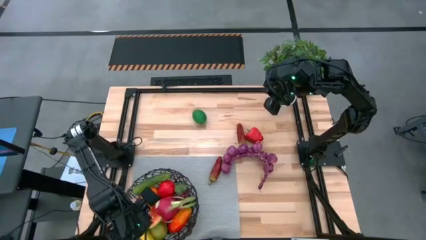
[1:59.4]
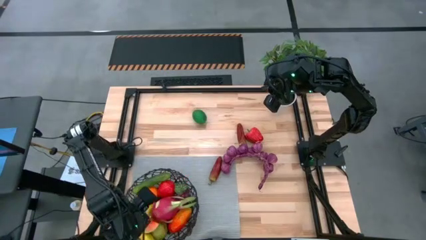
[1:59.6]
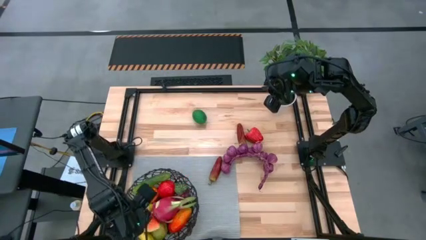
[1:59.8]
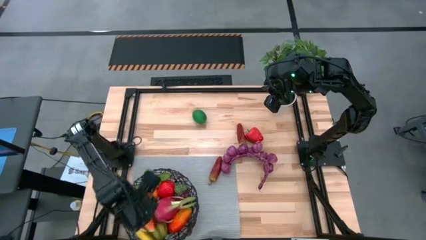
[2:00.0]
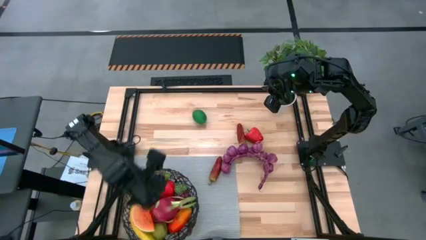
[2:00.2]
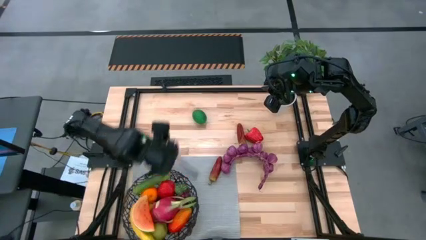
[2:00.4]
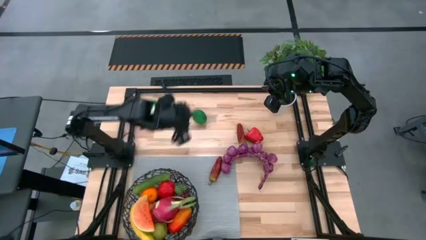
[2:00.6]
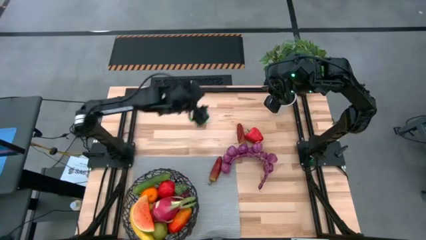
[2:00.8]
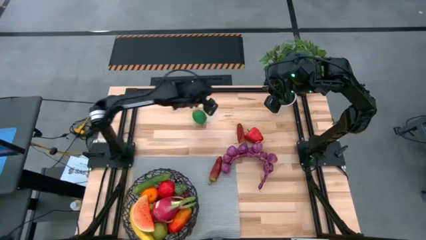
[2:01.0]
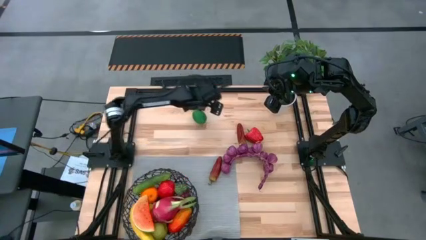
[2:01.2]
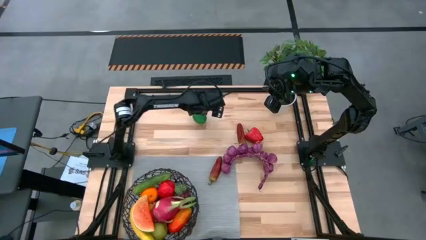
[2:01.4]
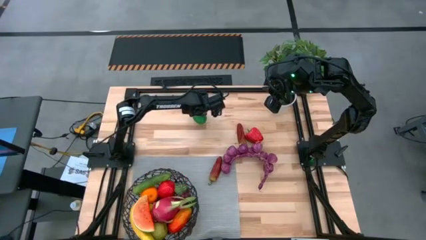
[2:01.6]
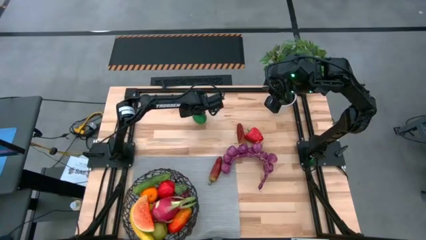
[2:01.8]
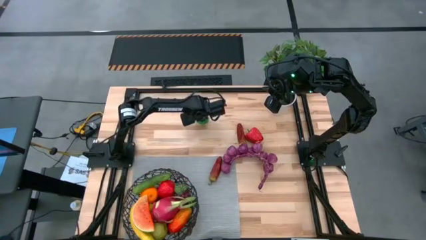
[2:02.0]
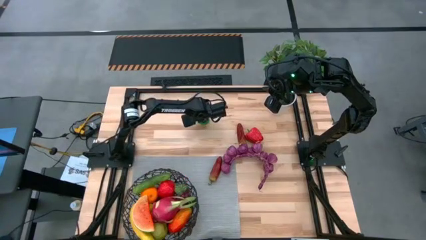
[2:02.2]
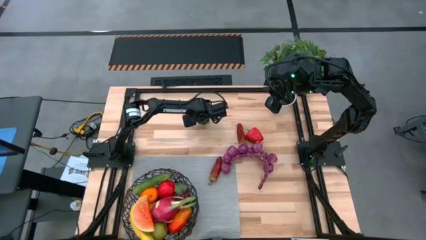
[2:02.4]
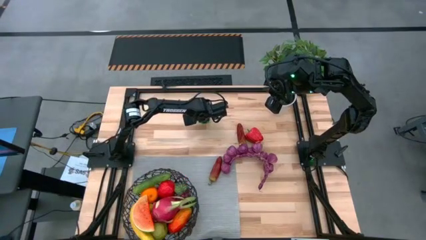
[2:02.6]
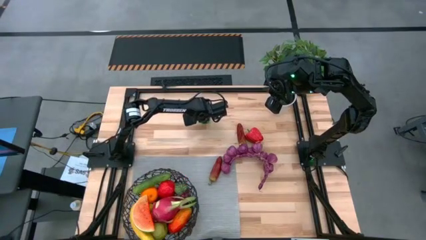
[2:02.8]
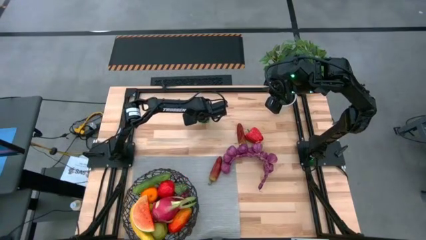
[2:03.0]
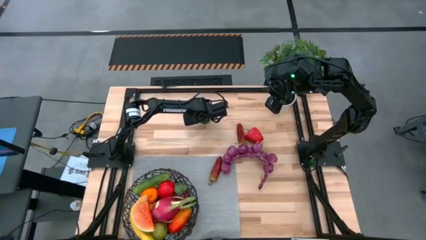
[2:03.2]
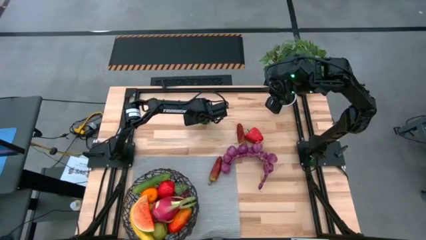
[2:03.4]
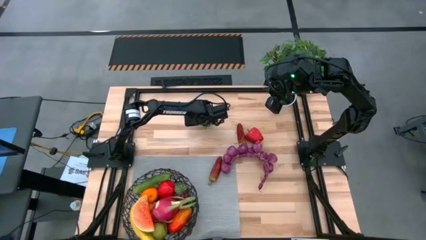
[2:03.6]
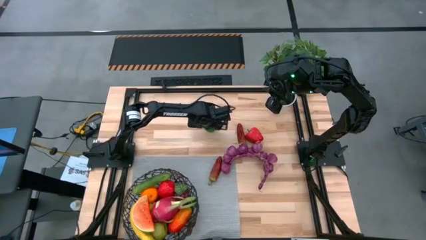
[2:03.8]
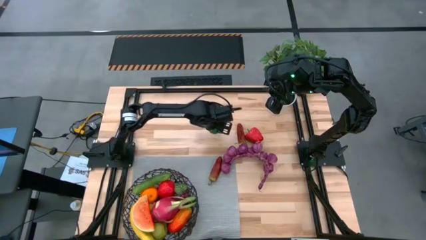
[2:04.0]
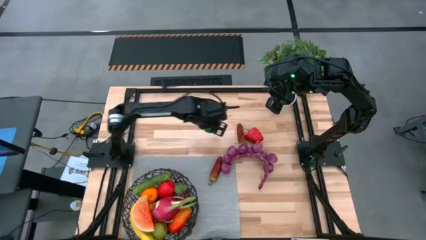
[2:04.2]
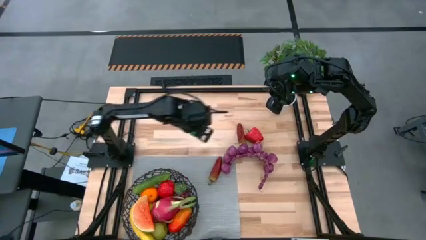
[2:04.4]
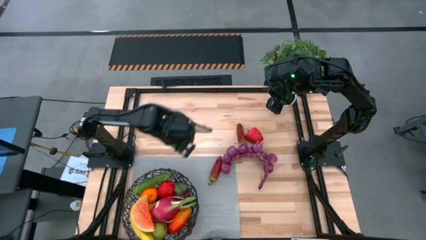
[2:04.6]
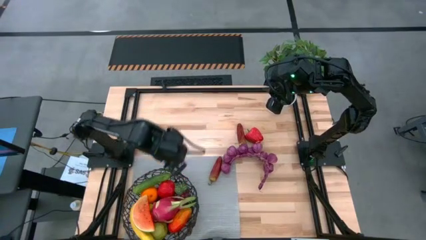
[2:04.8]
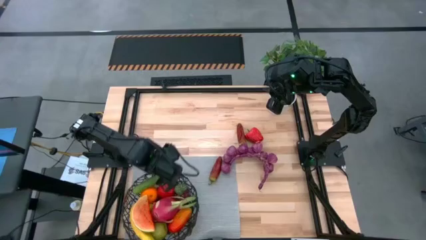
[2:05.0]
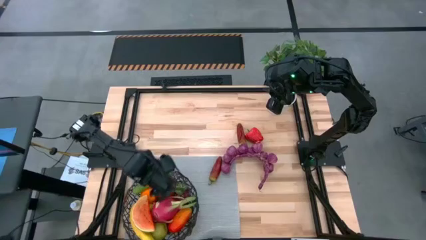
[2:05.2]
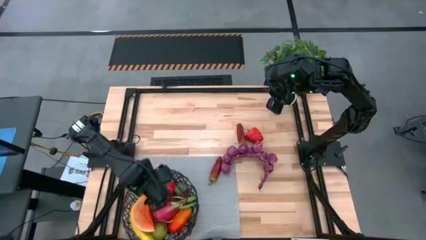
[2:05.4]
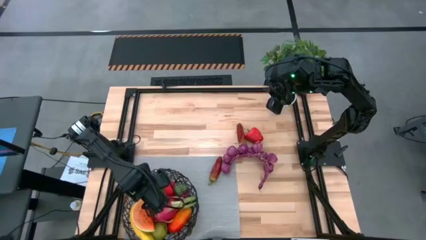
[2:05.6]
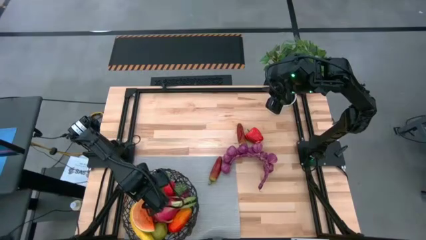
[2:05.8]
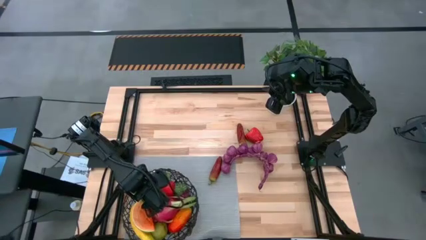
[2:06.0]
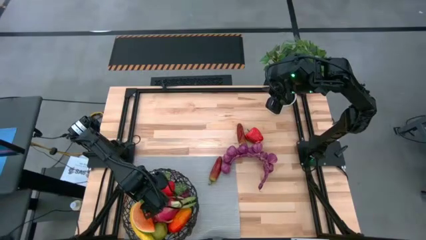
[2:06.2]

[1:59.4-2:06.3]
Task: Build produce basket
Put the lime into the black wire basket

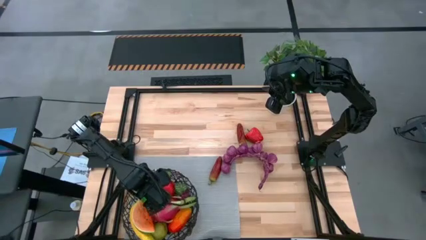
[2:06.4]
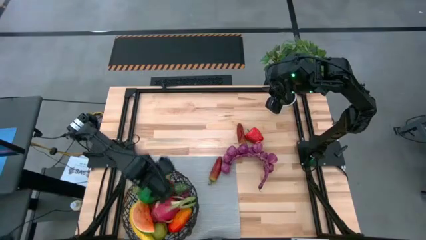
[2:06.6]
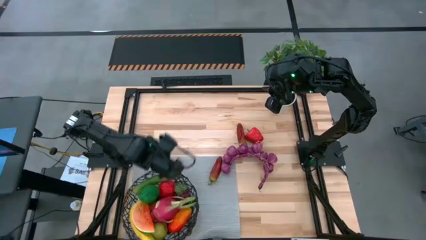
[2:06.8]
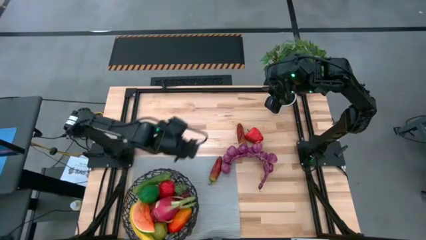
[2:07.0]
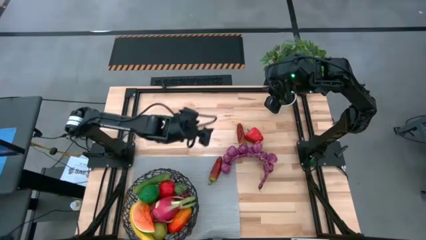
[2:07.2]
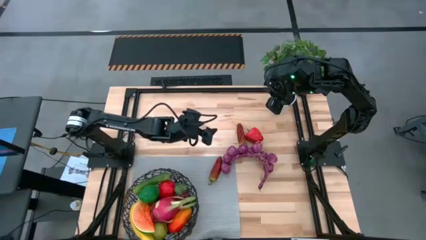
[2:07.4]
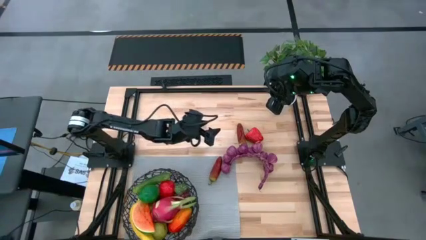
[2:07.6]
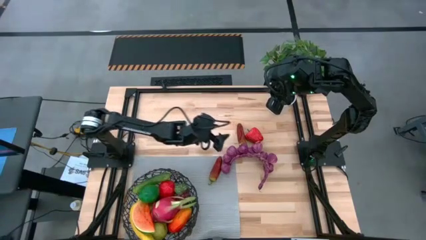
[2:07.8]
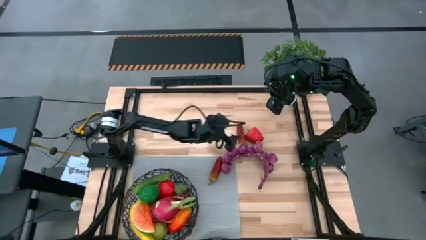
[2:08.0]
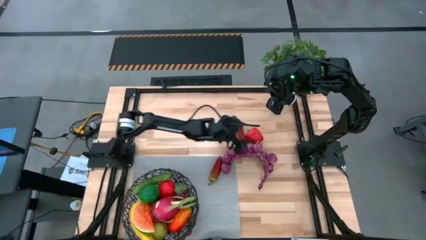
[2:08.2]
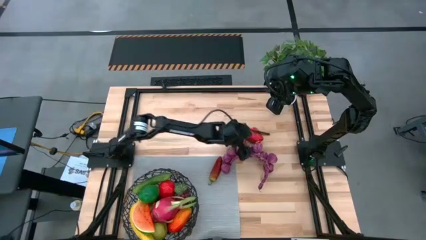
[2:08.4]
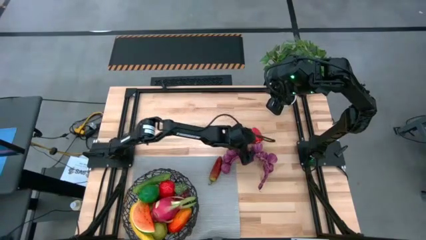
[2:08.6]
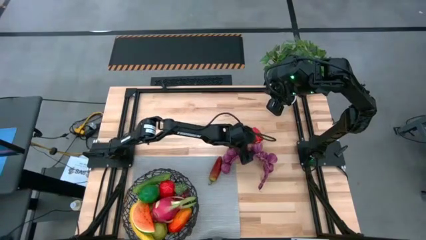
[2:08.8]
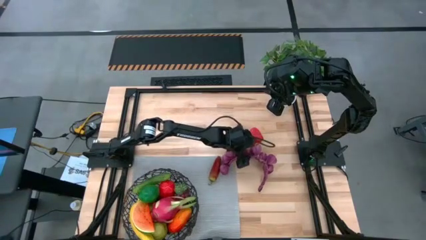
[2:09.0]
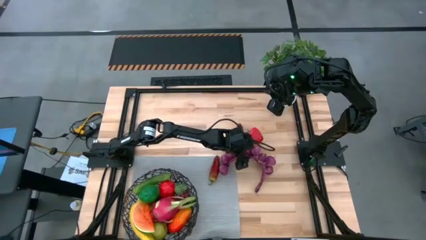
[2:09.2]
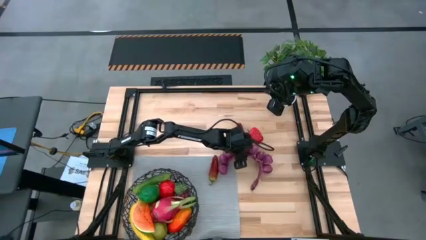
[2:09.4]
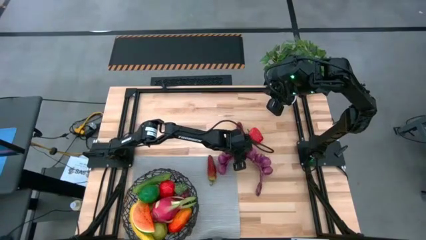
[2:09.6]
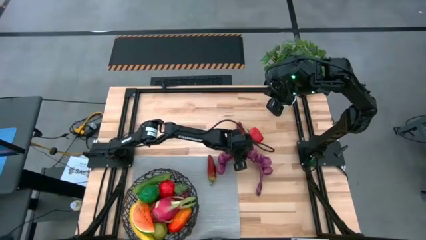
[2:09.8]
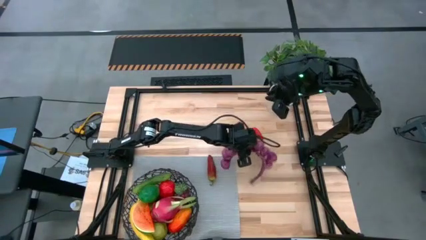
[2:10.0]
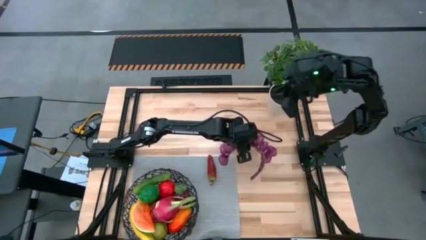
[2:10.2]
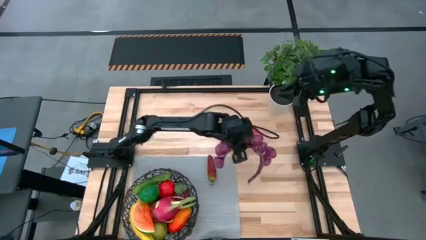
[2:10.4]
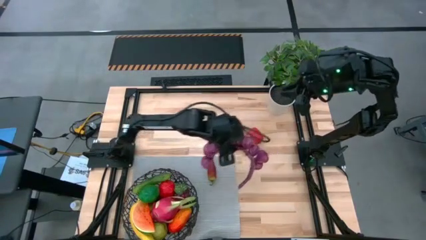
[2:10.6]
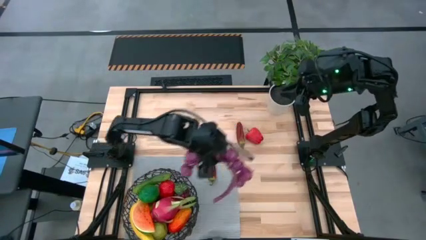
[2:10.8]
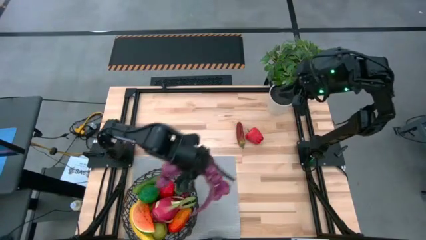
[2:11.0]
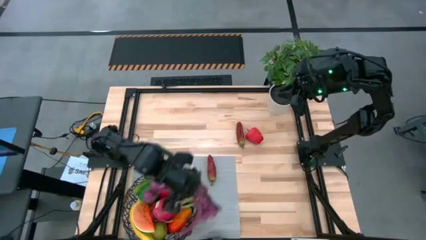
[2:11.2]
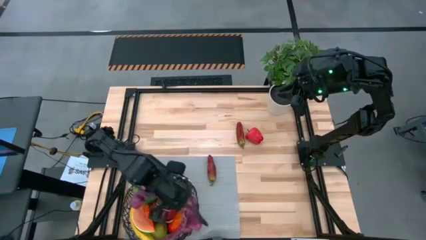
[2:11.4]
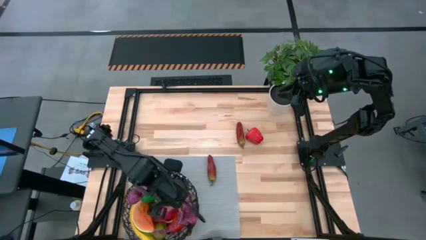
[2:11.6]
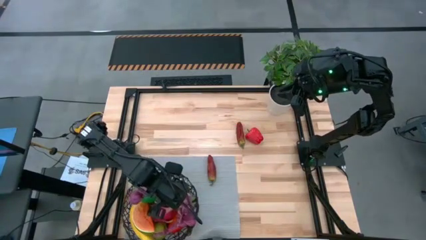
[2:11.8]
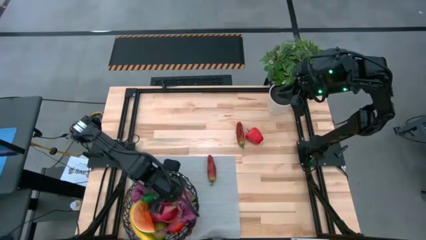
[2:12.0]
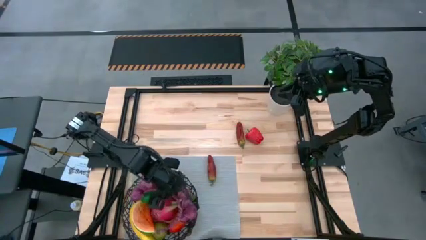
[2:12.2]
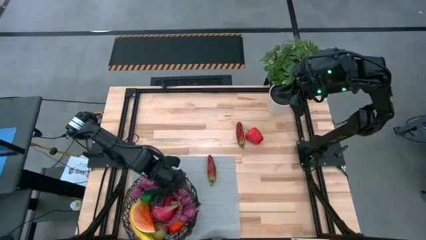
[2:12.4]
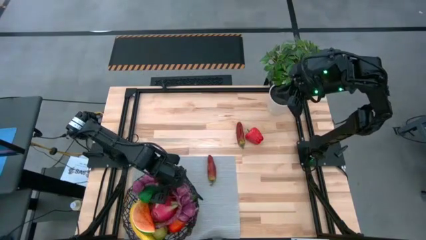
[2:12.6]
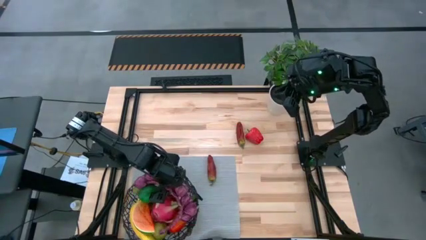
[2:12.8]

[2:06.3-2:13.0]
Put the purple garlic into the black wire basket

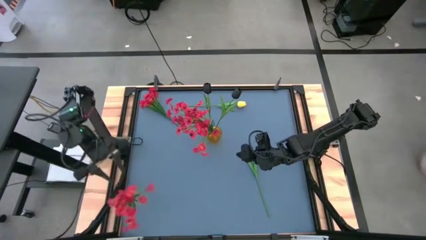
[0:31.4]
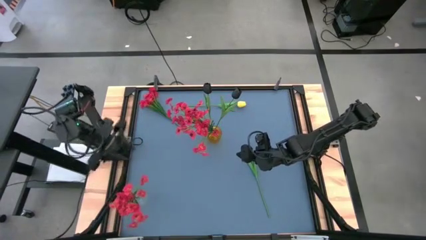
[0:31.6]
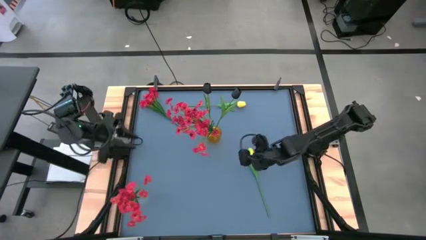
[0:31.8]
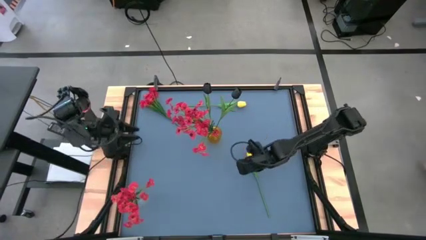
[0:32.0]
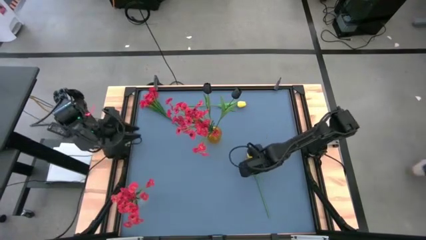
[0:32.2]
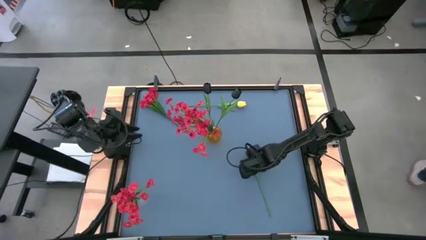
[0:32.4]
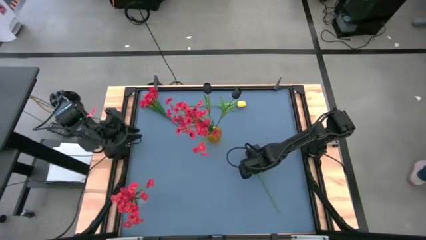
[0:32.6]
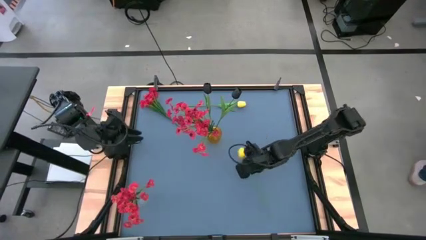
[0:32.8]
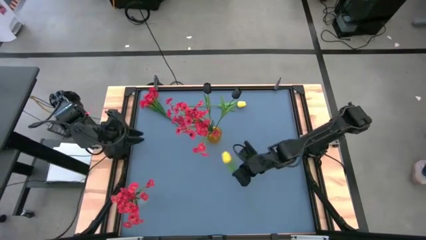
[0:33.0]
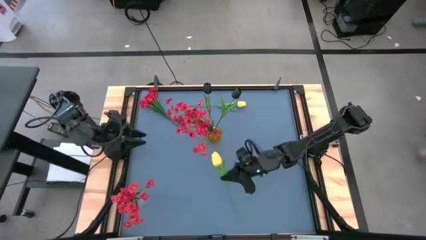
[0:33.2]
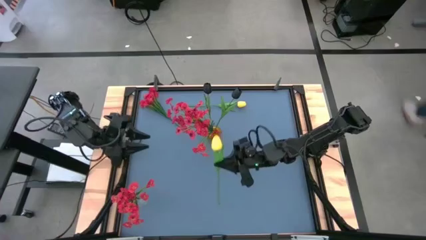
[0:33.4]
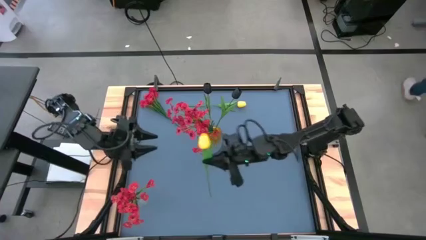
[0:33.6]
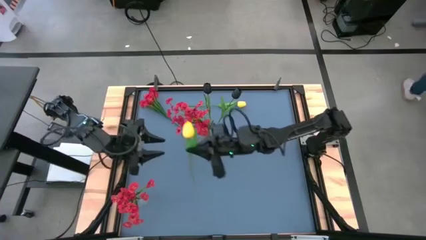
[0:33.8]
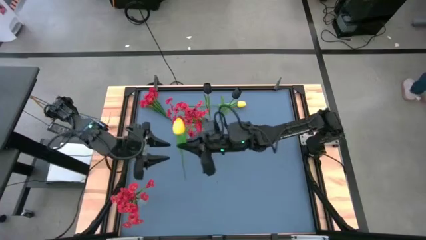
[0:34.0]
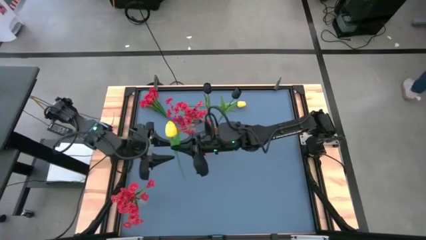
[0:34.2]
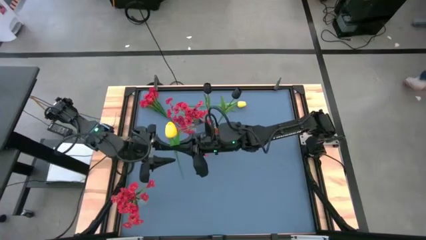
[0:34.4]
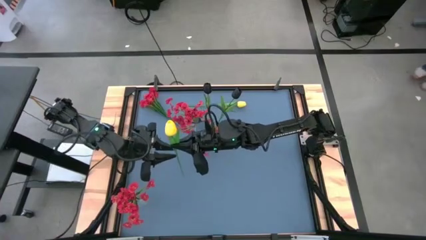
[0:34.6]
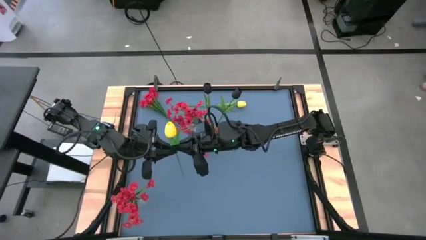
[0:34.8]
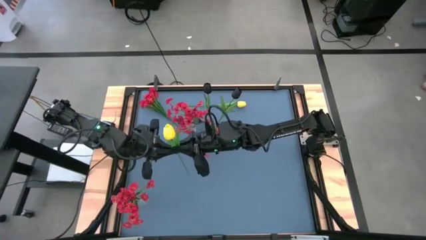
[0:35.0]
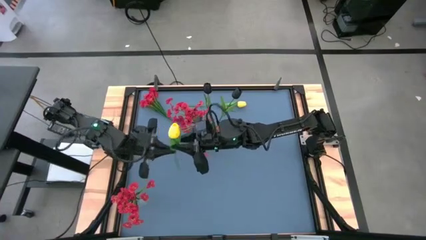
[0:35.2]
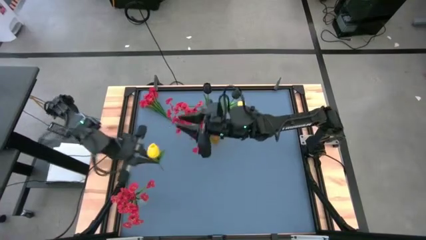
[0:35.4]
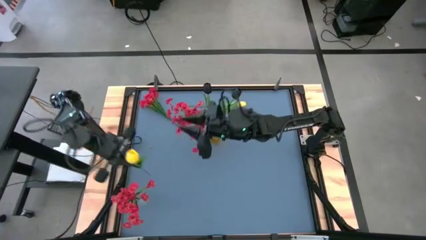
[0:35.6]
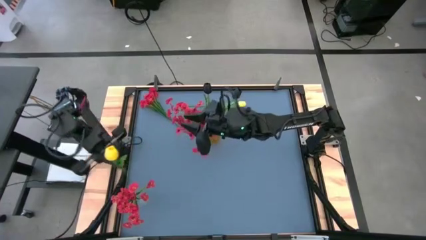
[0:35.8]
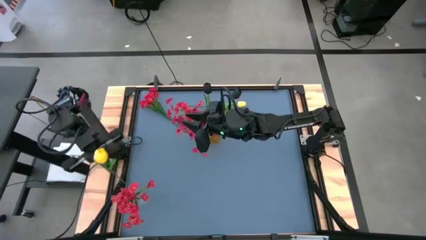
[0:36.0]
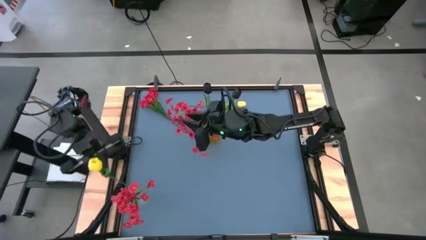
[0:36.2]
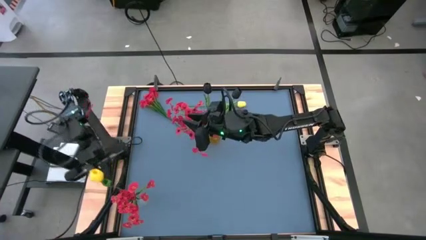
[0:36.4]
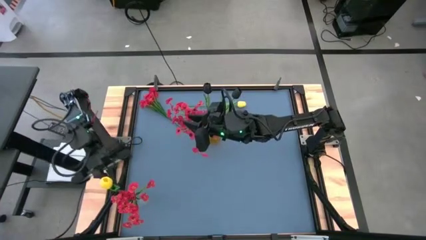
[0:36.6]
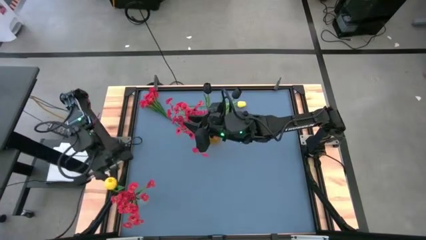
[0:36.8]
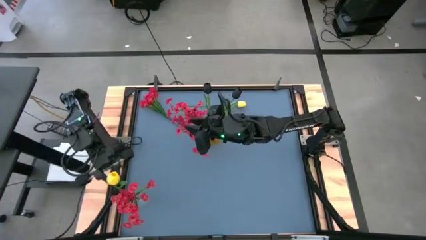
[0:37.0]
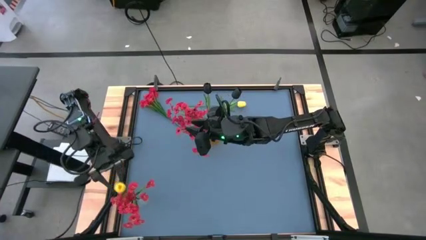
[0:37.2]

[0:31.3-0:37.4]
Task: Sort flowers into vase by color
Put the bottom yellow tulip into the transparent vase
